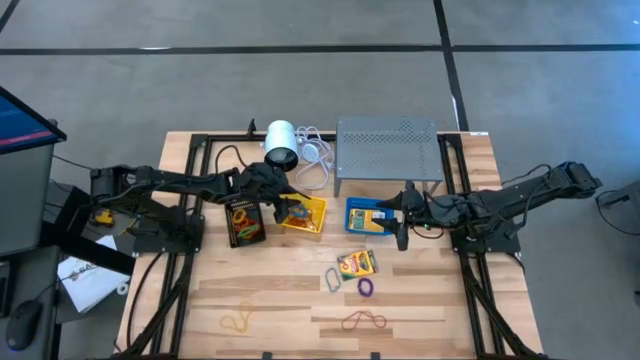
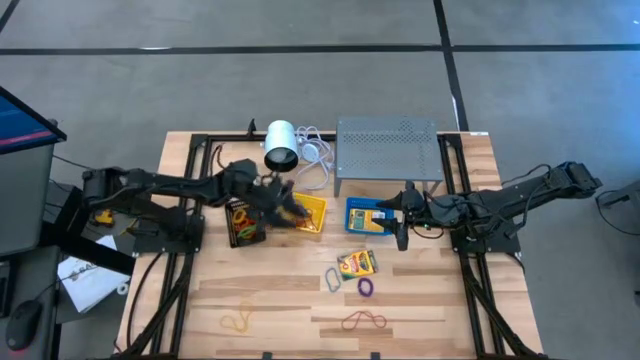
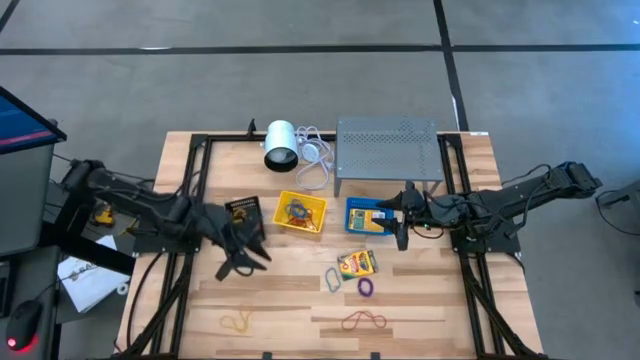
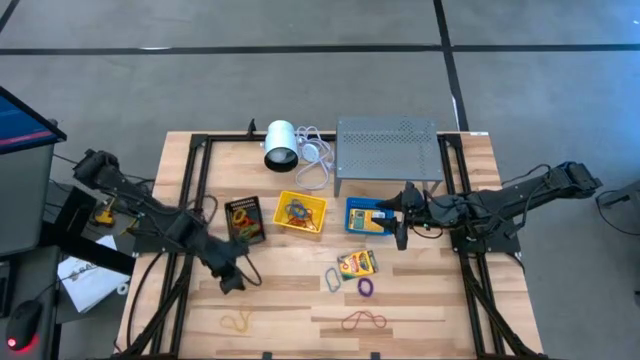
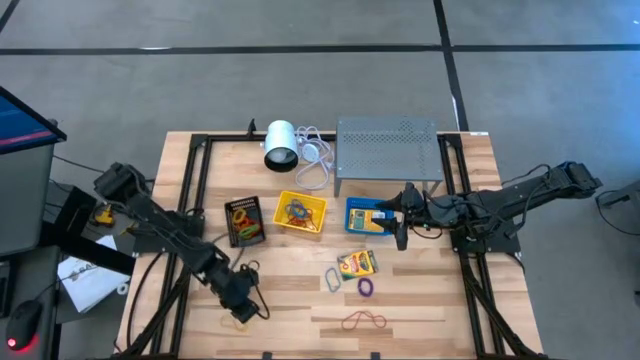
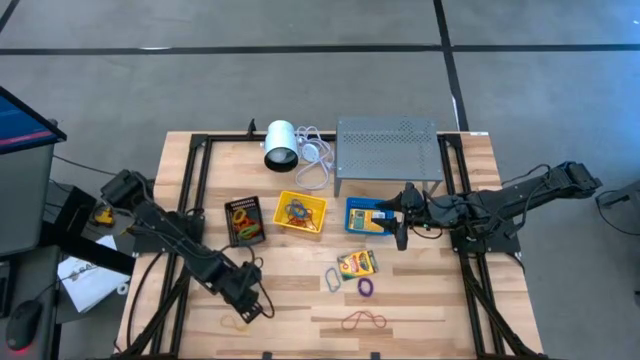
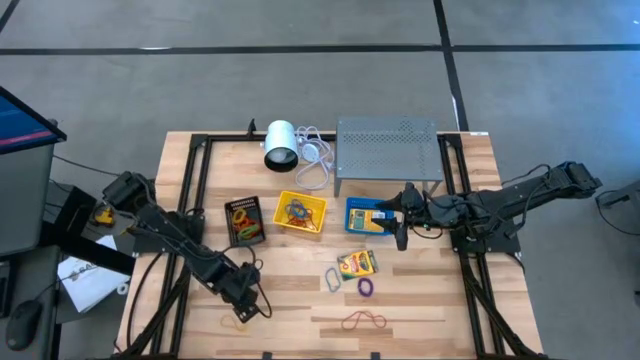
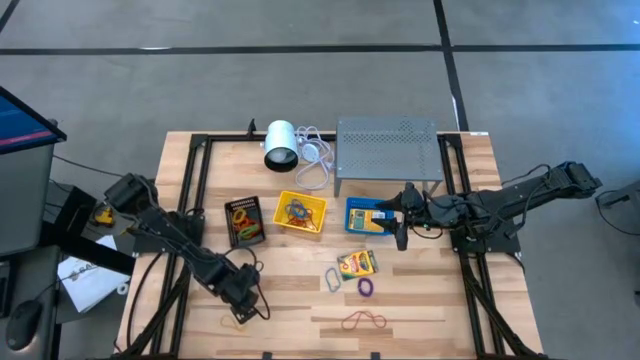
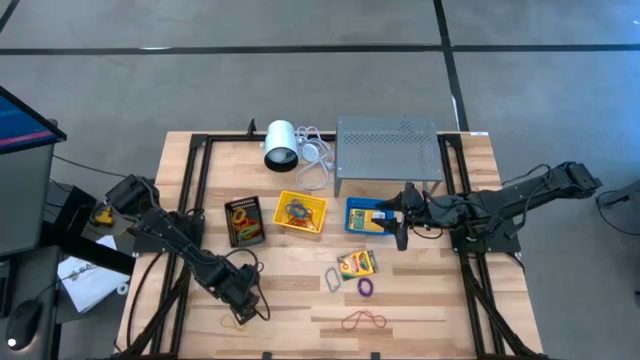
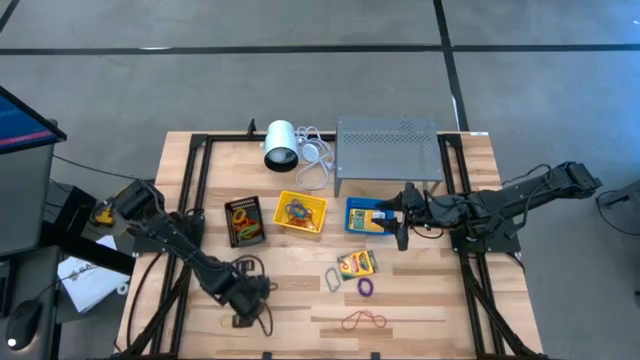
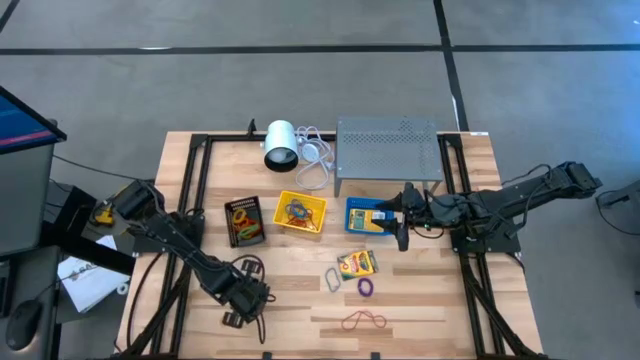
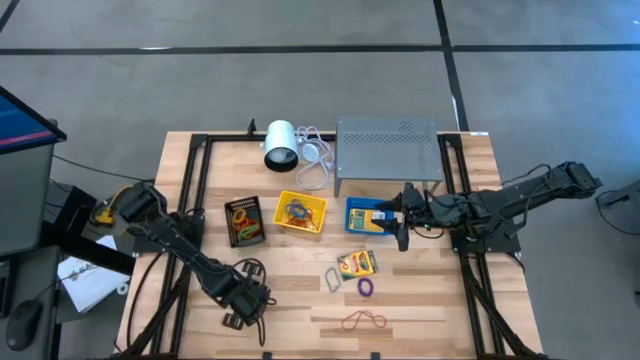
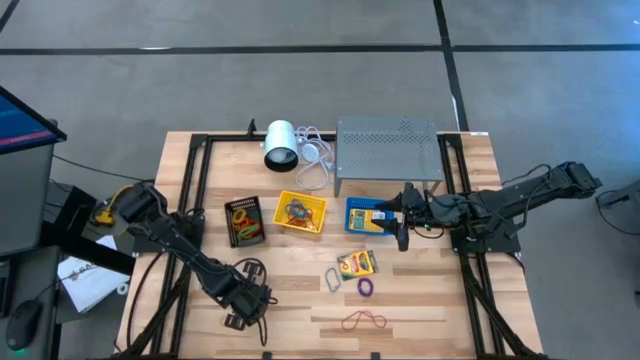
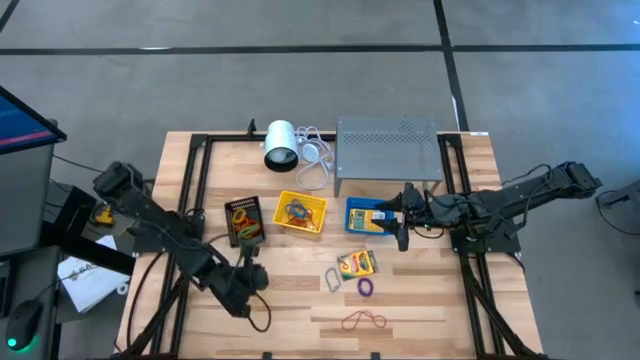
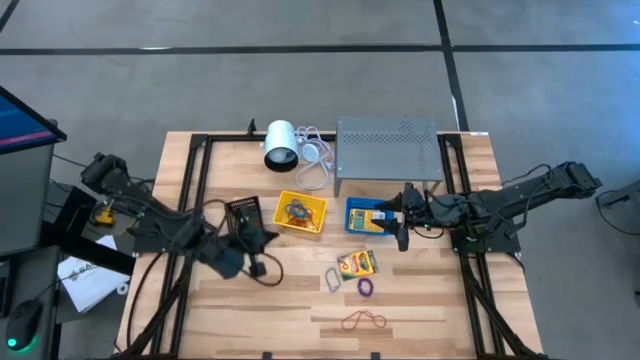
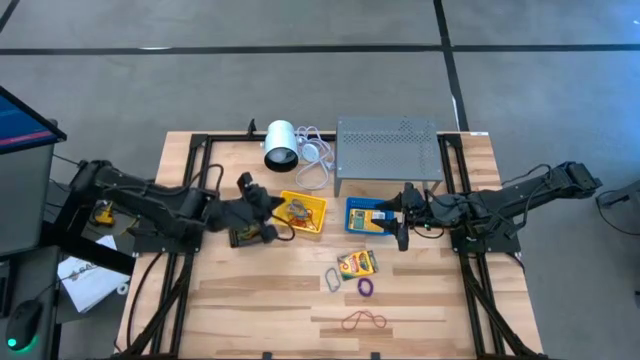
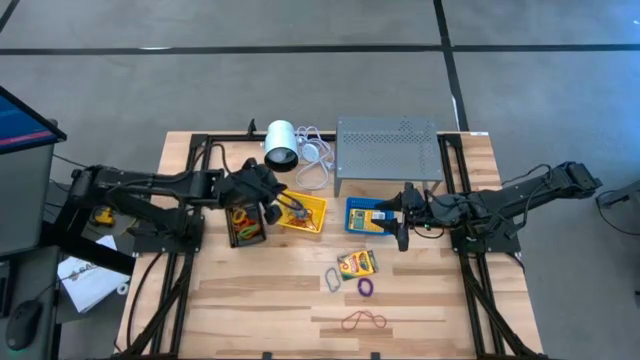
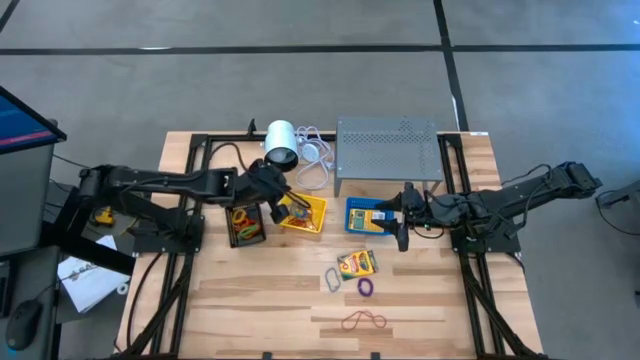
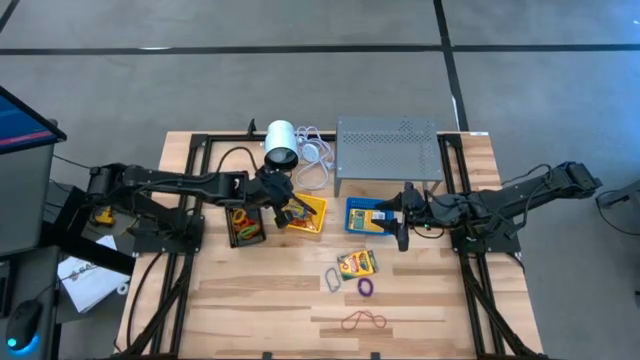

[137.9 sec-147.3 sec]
Task: Pick & Place Office Desk Supplies
Put the yellow rubber band into the yellow bin

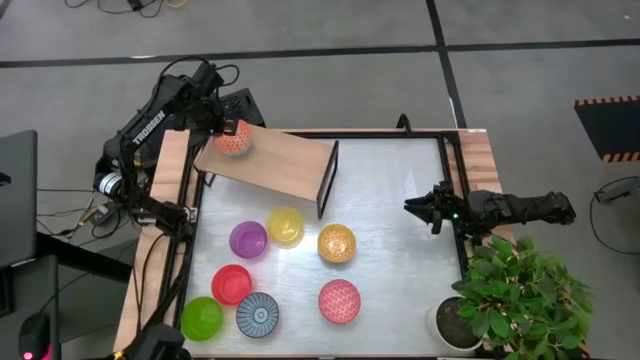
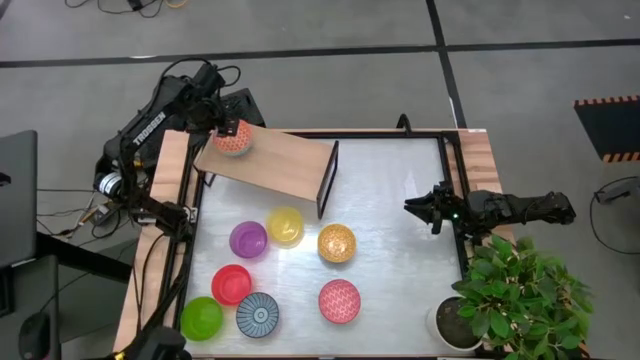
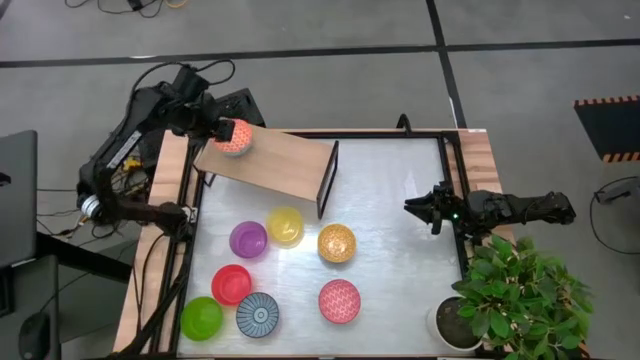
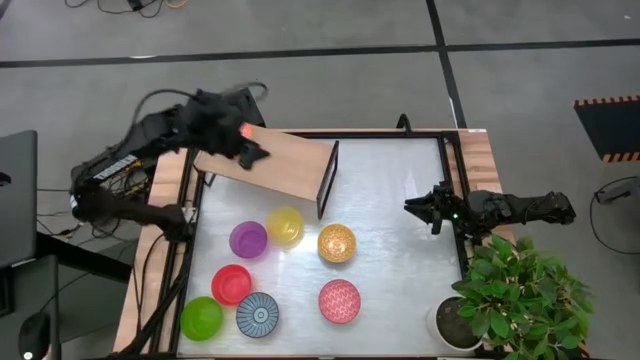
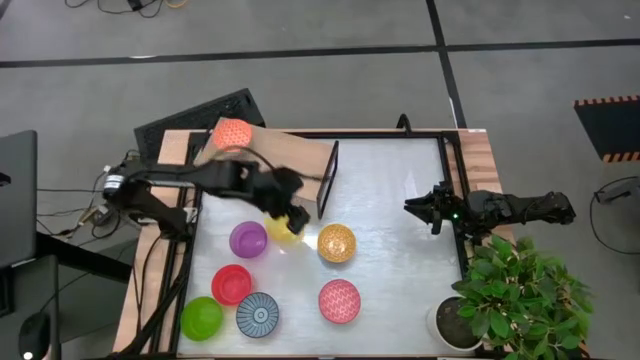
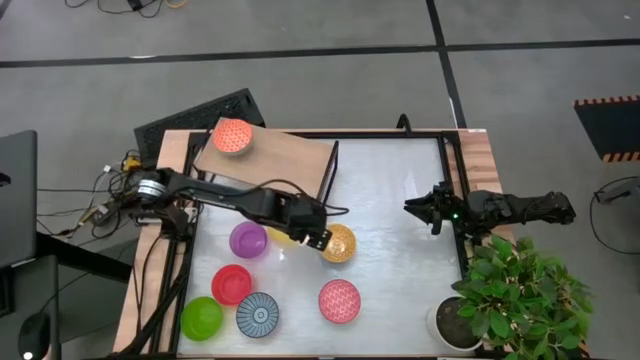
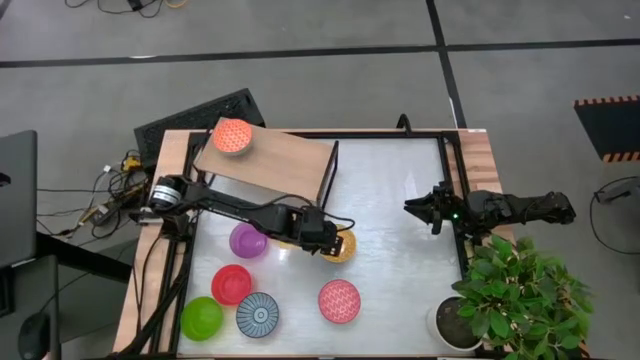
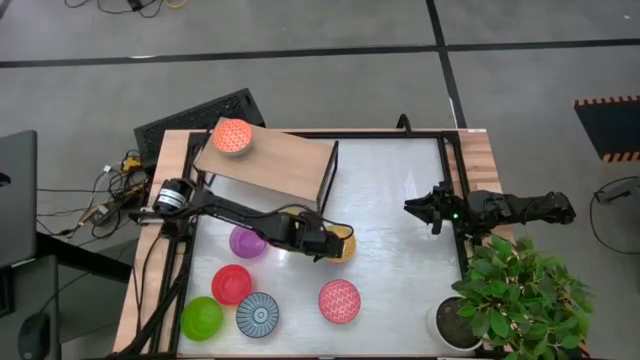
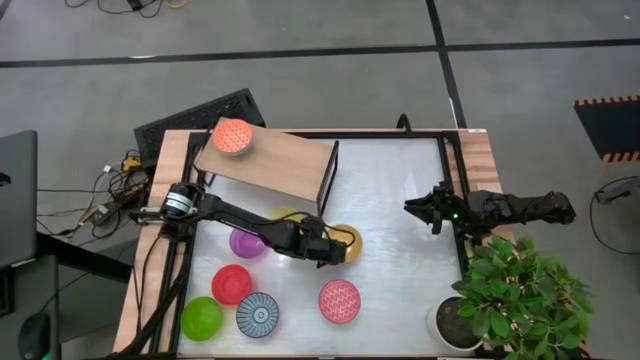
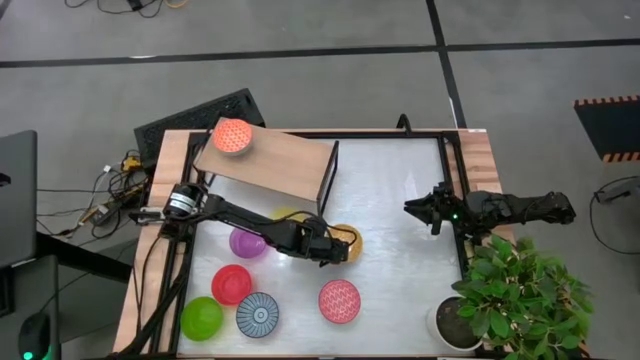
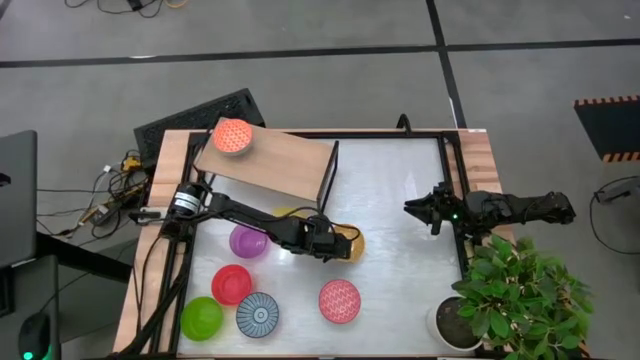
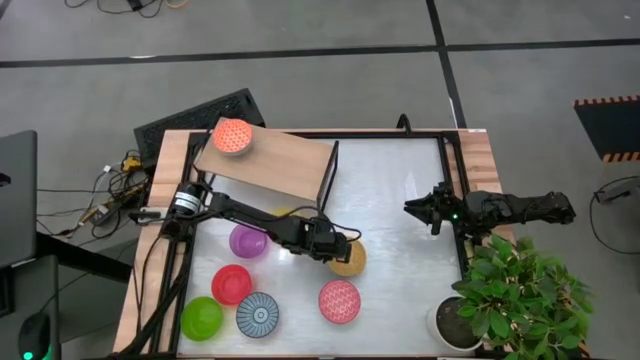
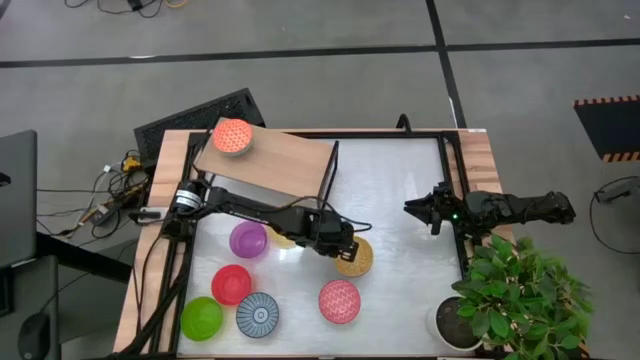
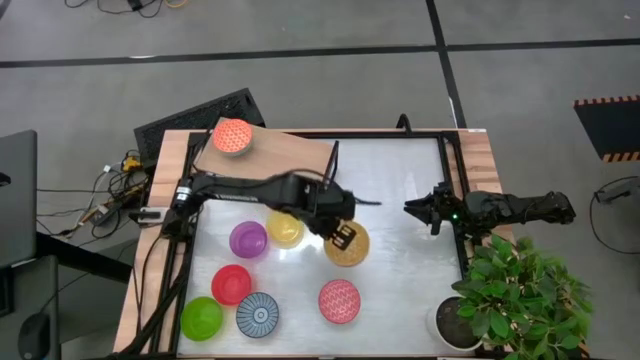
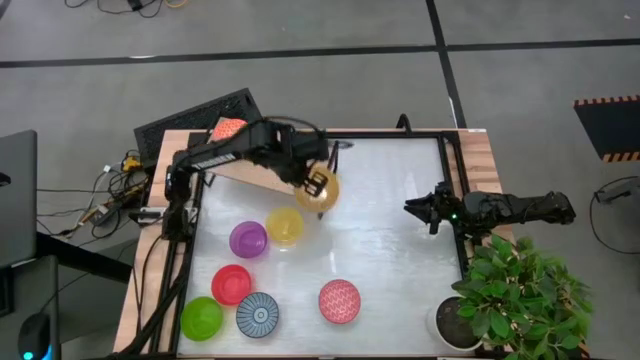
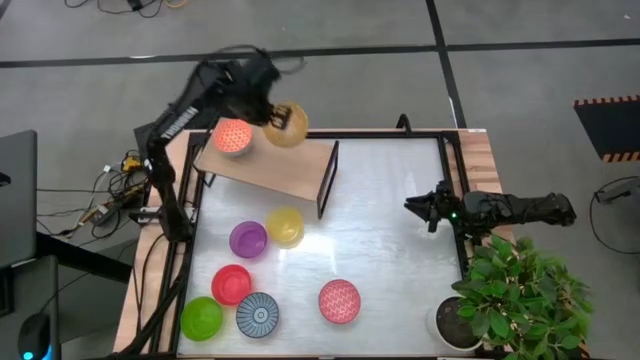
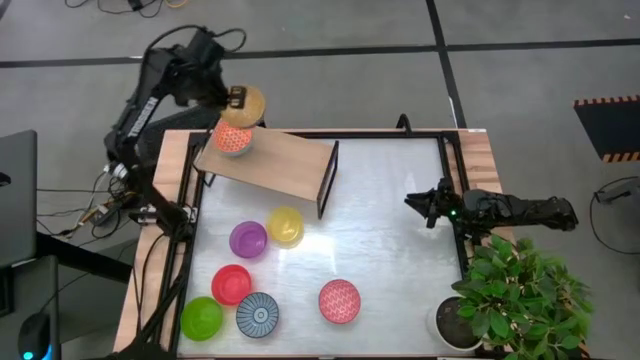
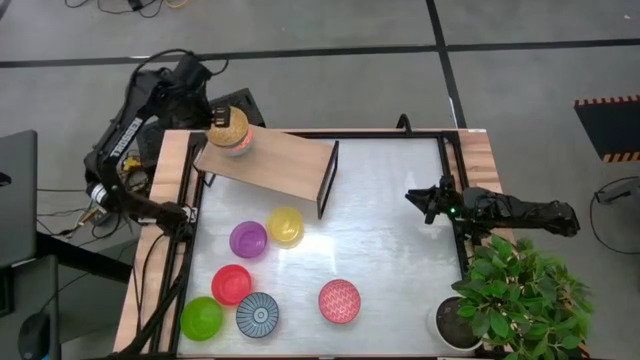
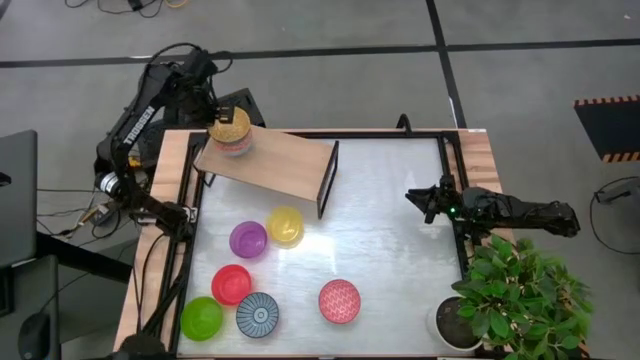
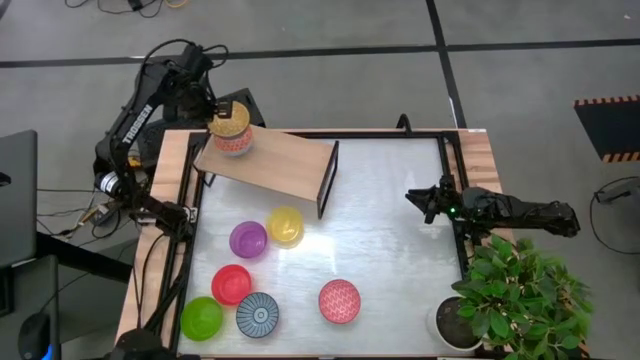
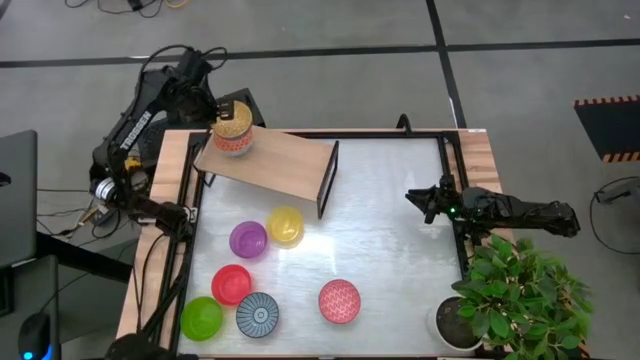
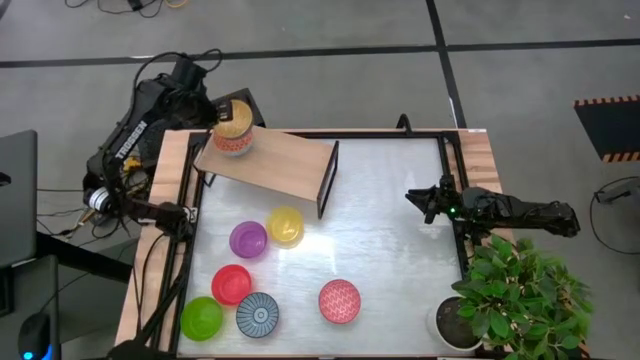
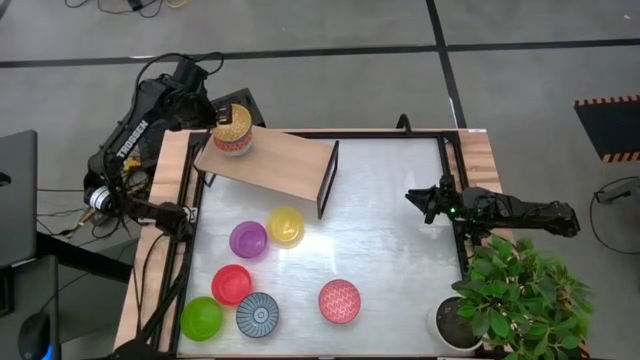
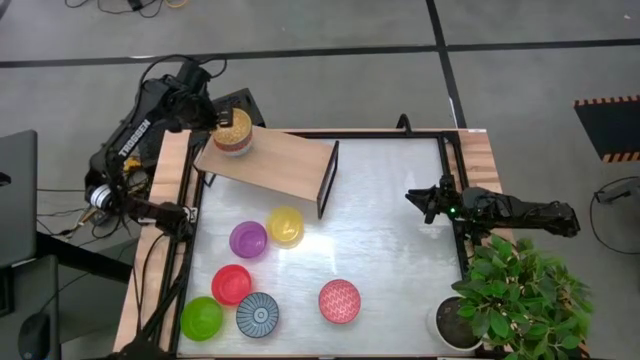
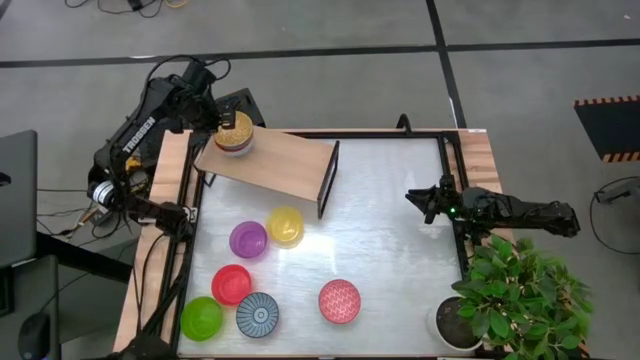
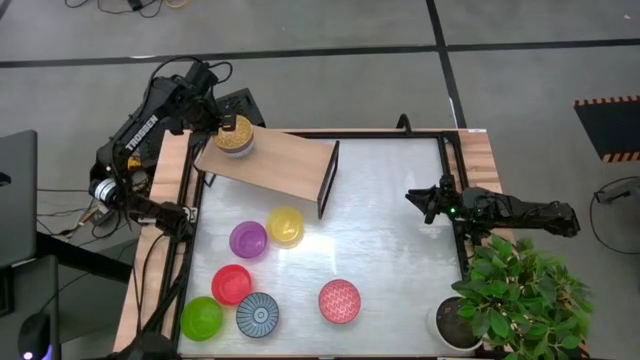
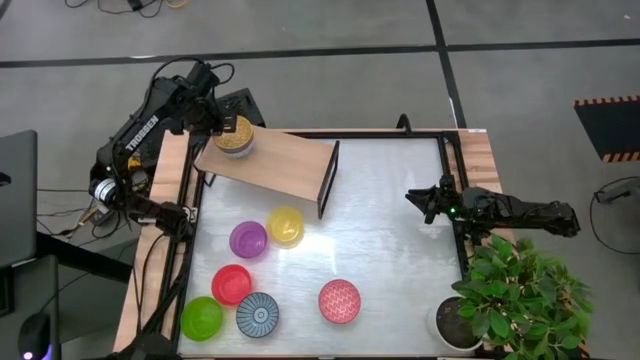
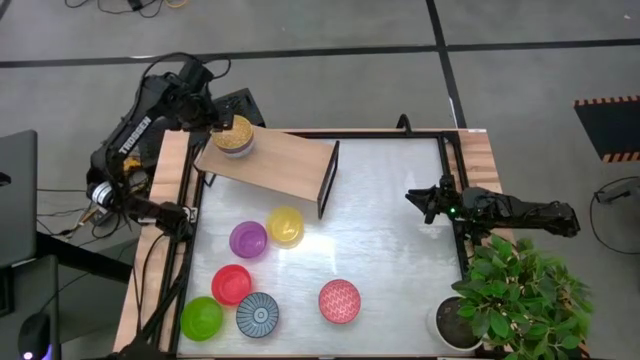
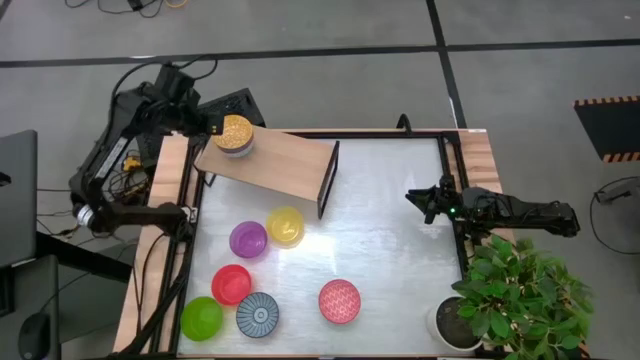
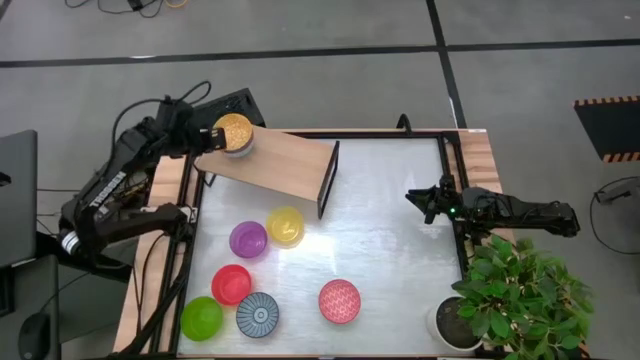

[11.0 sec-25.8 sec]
Task: Place and stack bowls onto a shelf
Stack the yellow patterned bowl on top of the orange patterned bowl on the shelf
